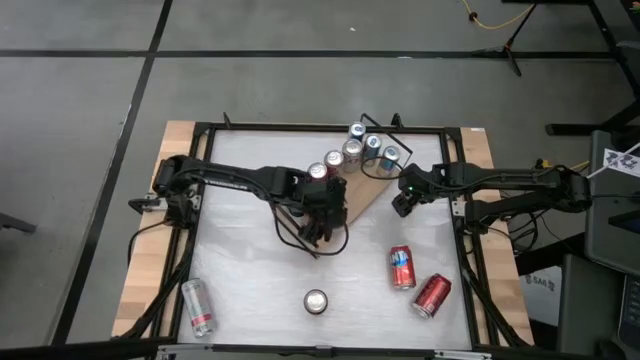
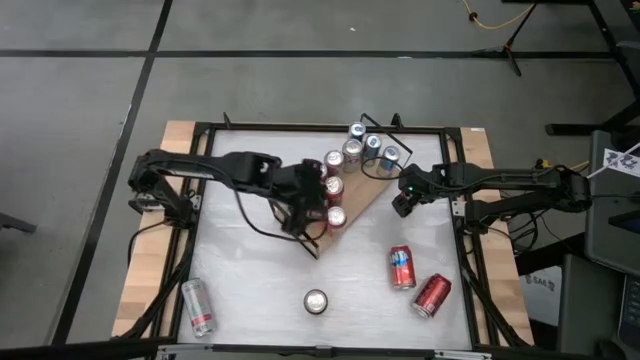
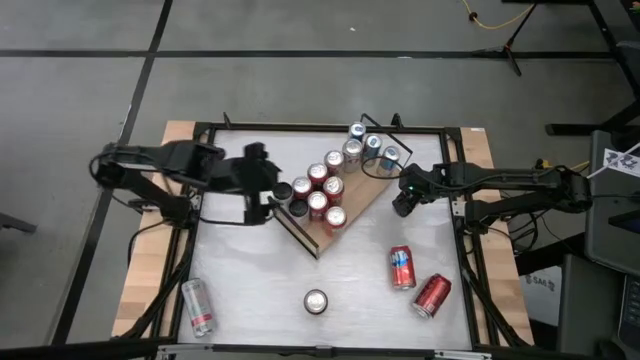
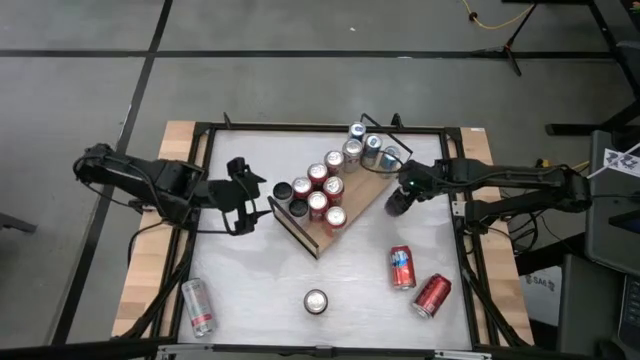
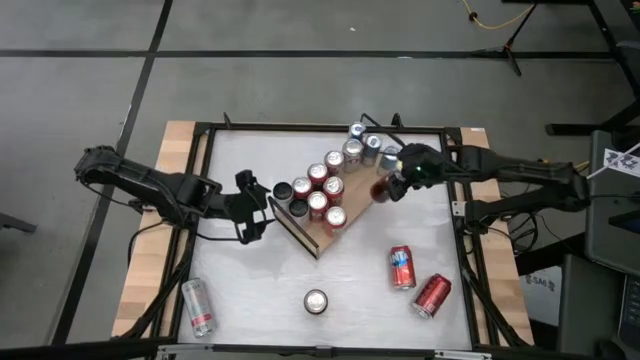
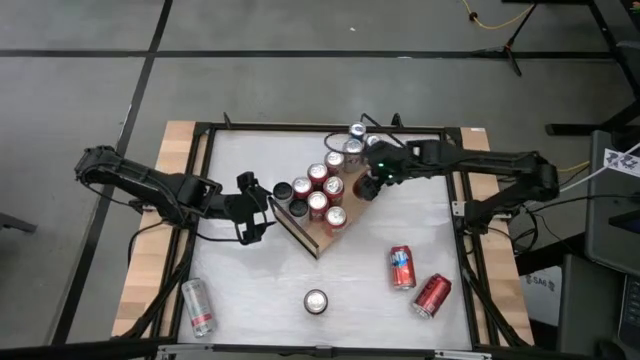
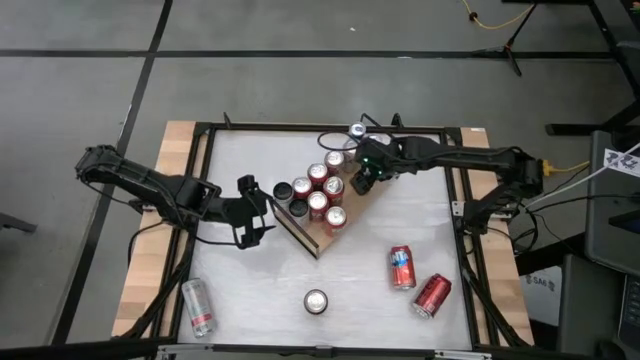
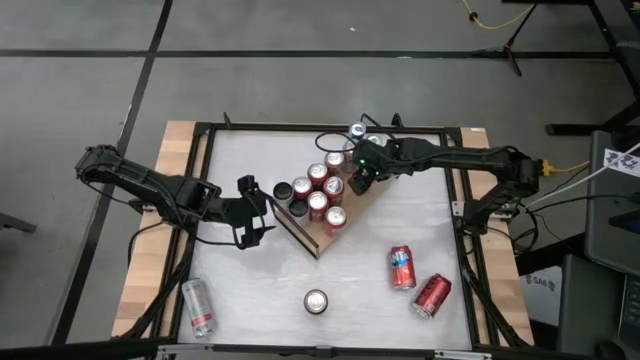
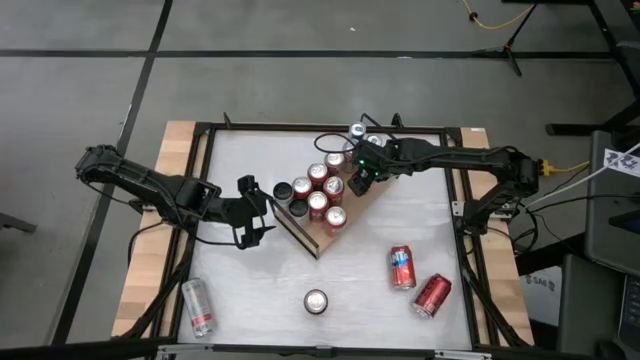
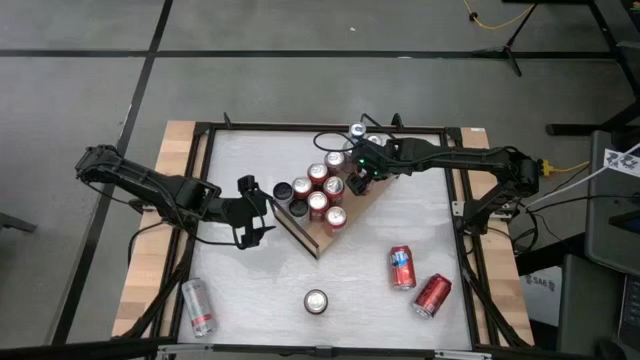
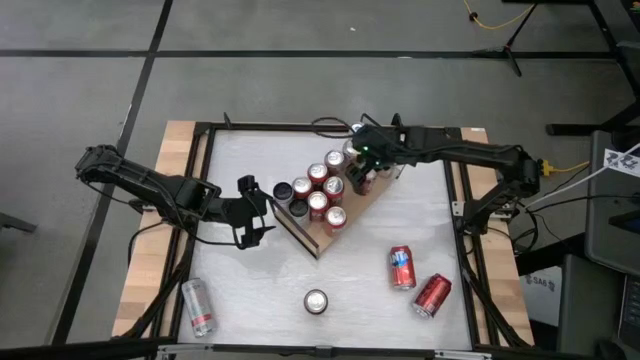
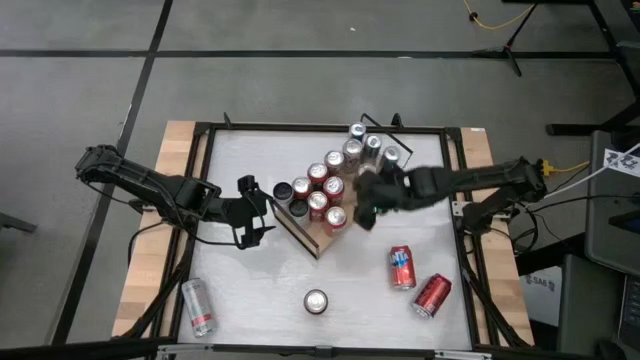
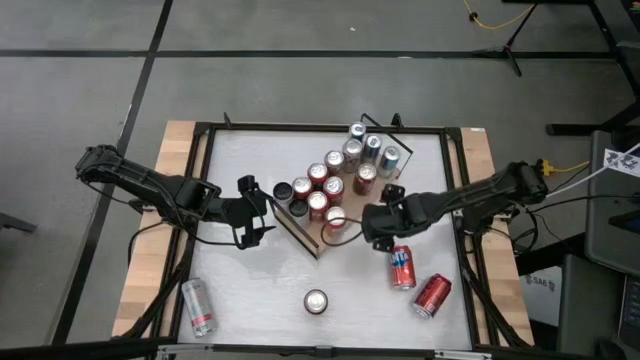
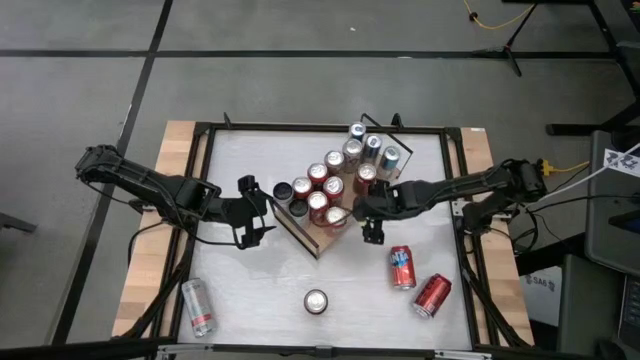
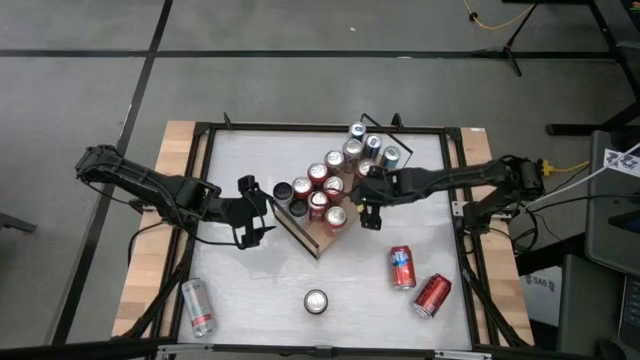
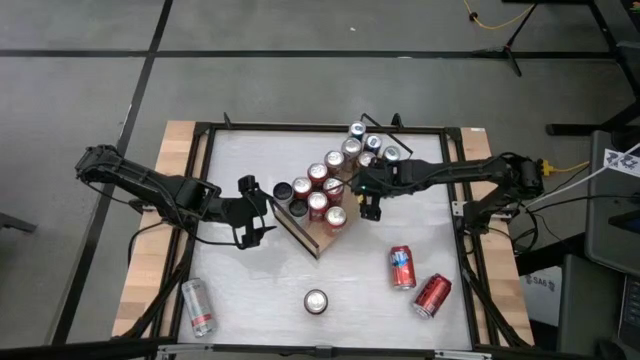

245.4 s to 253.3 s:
Task: Place canned beverage on shelf
Put the red white soda can on the shelf

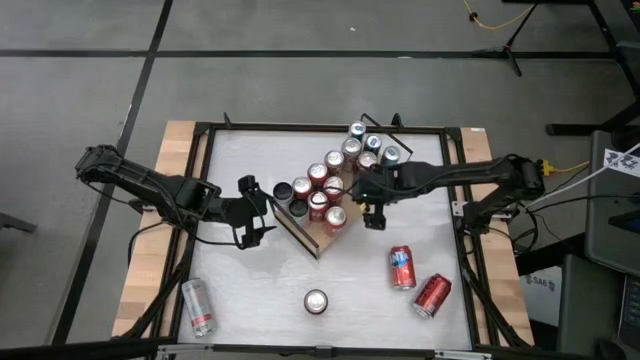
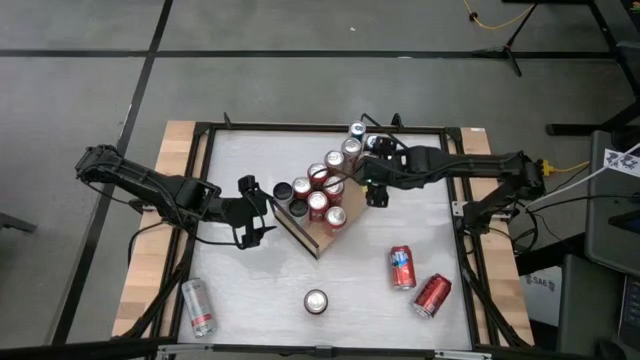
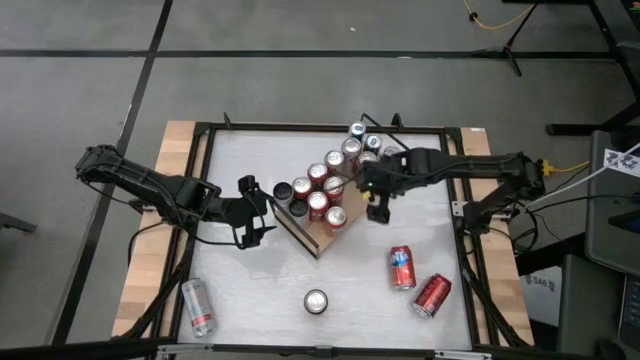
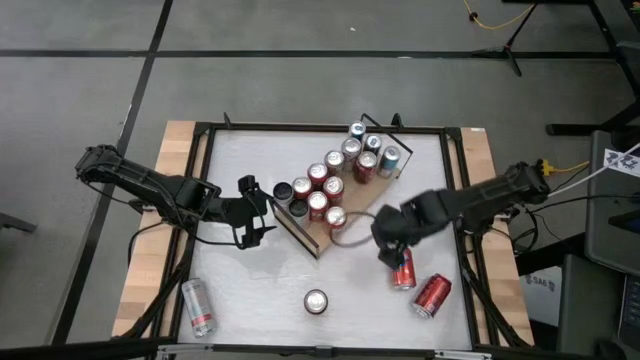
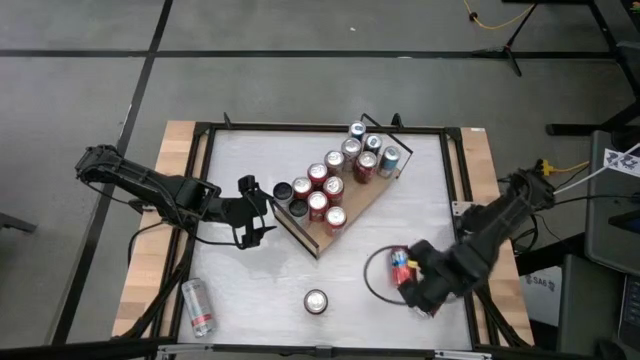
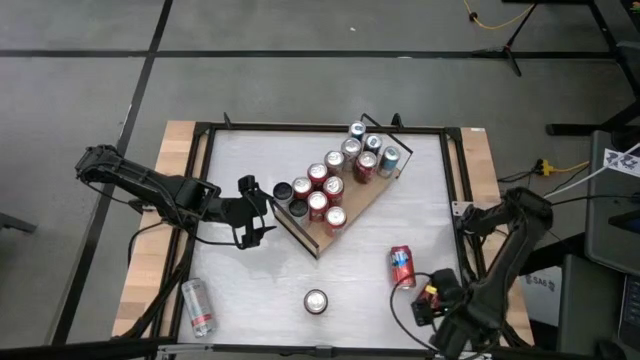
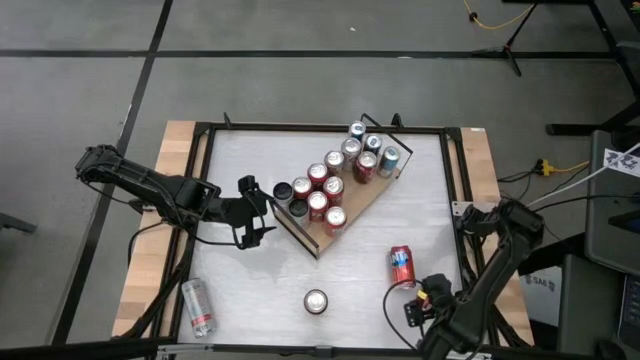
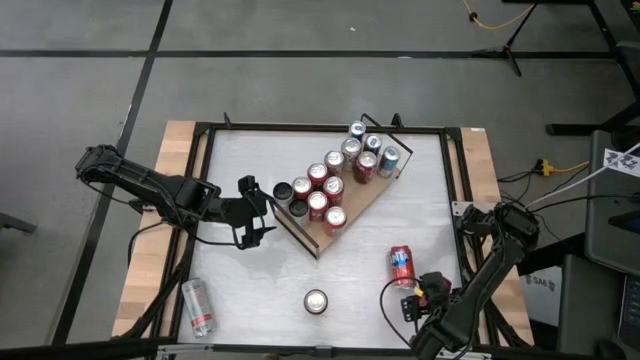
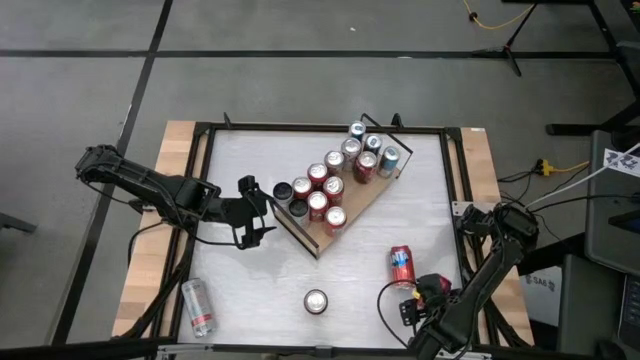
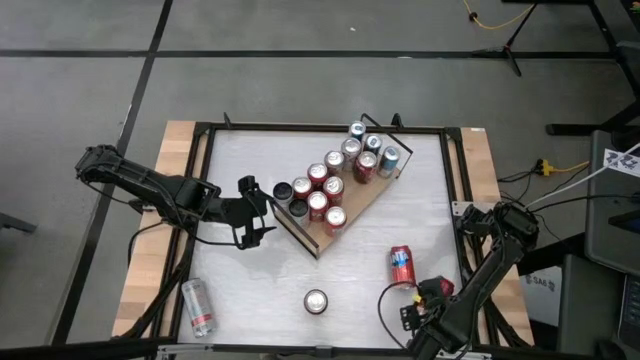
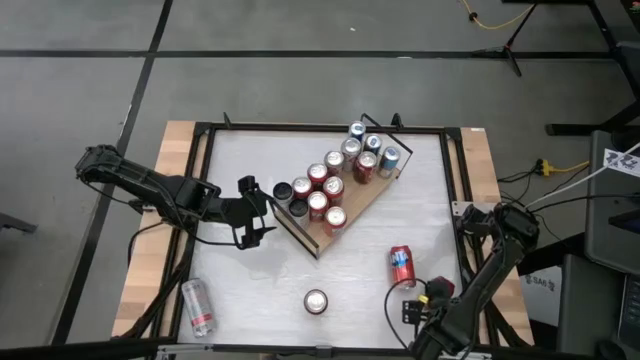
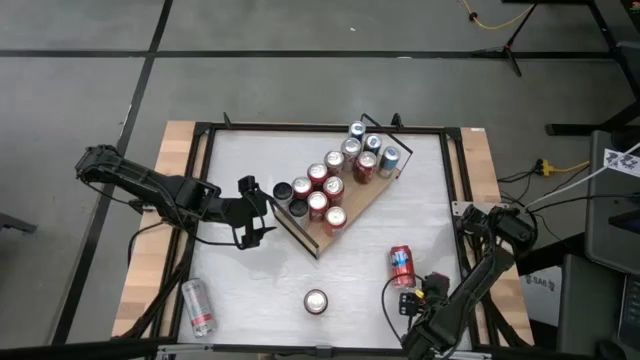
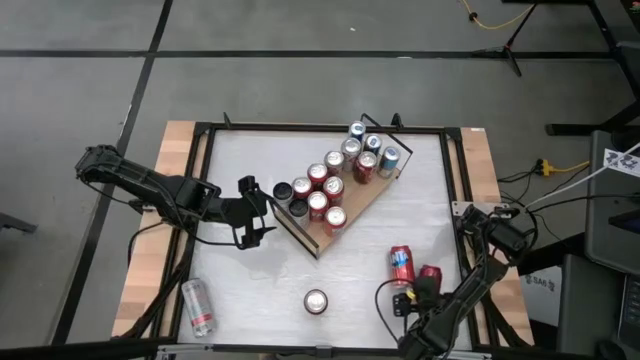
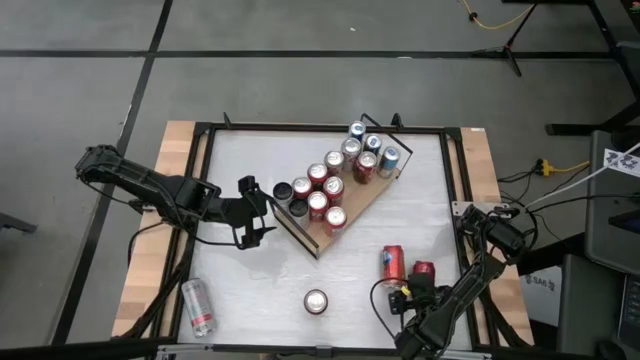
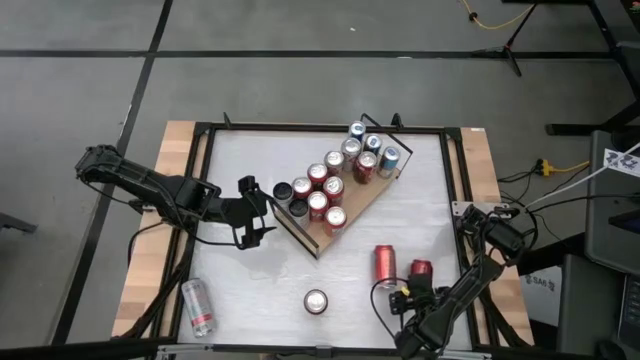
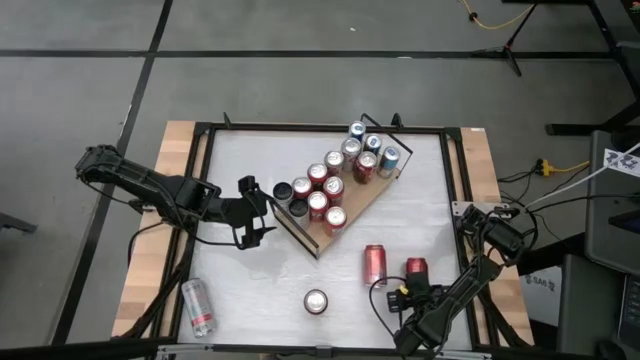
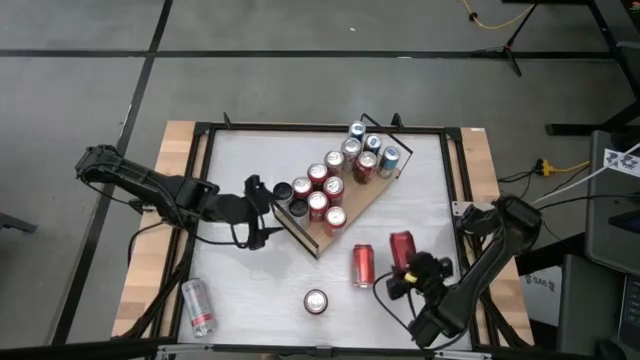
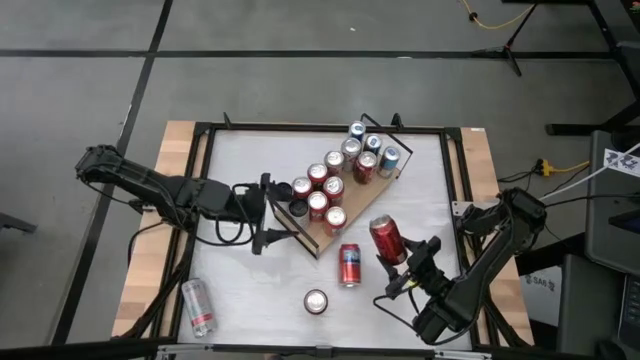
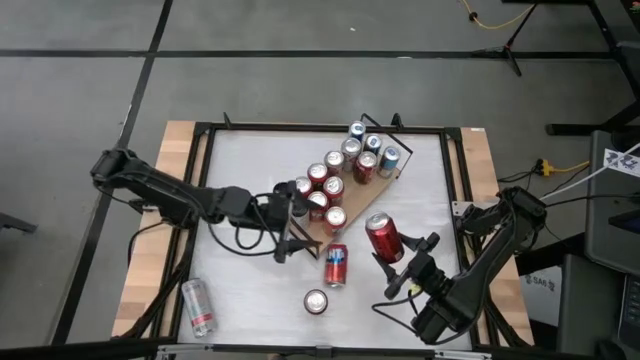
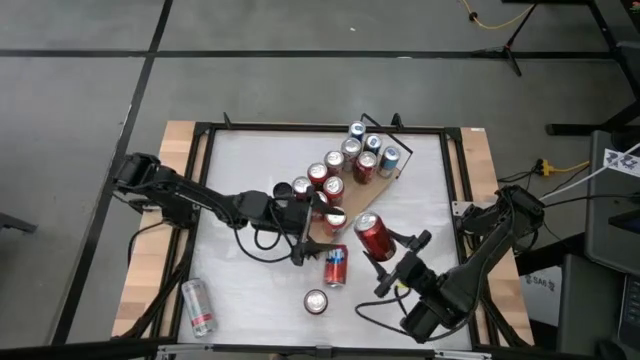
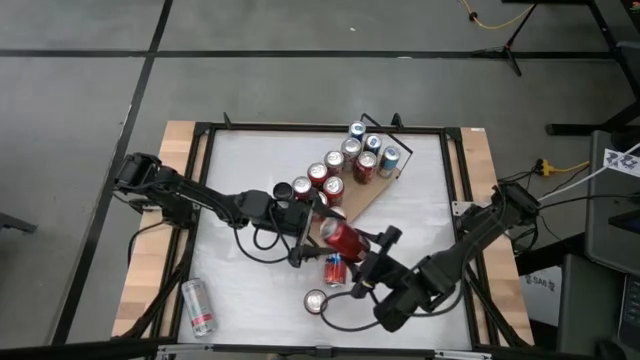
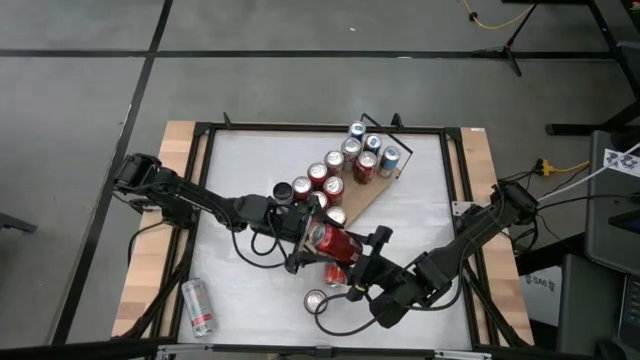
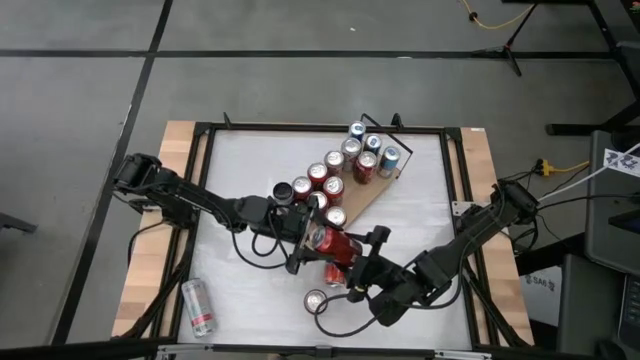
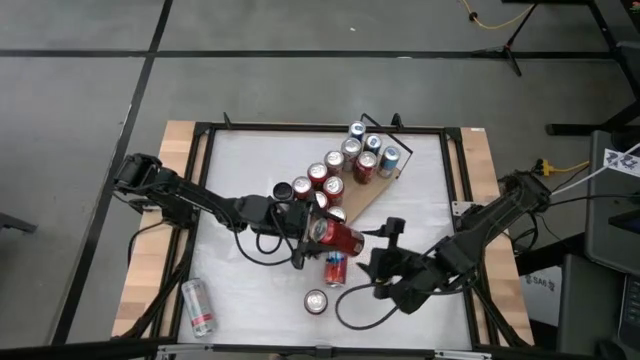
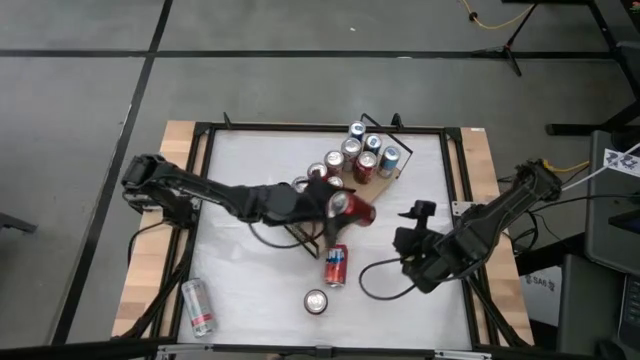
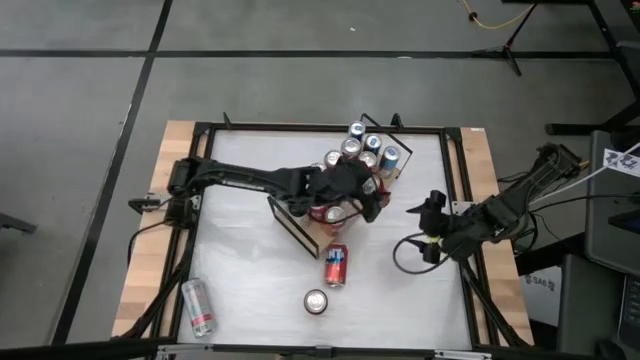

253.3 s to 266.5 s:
Put the red black soda can on the shelf

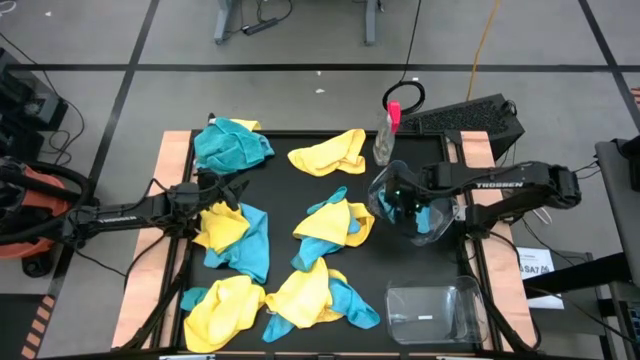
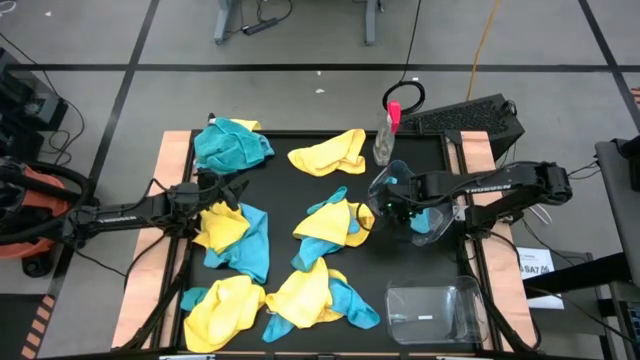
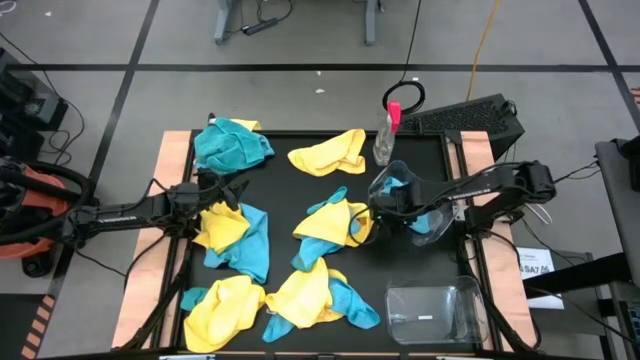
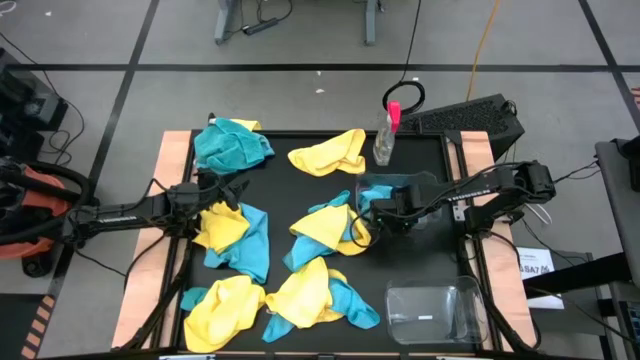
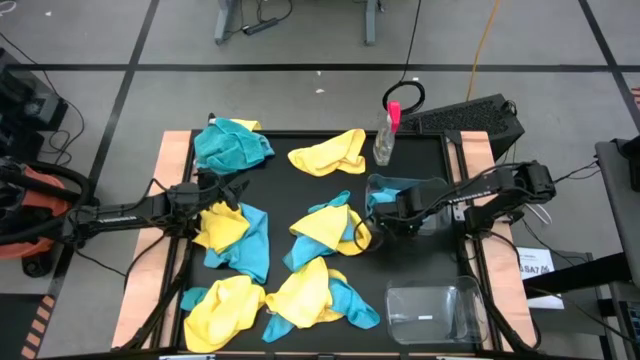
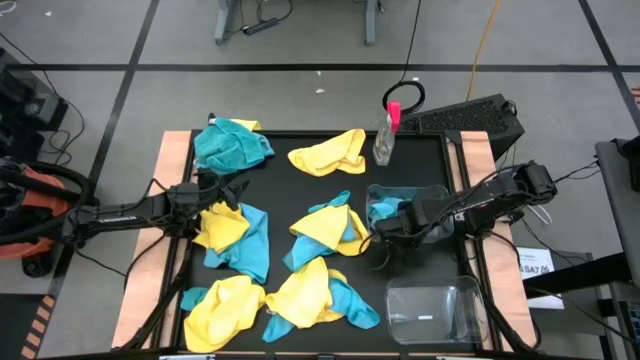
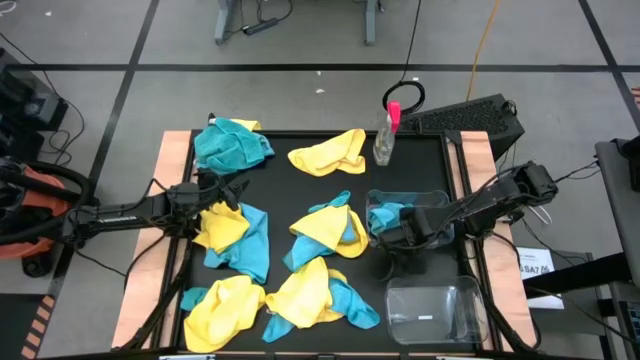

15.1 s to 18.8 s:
Task: Sort microfiber towel by color & place in baskets
Adjust the top transparent bin
